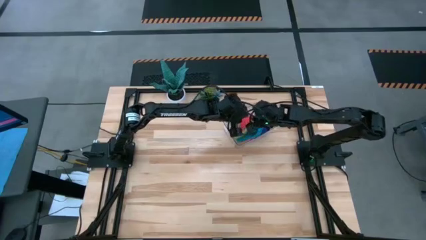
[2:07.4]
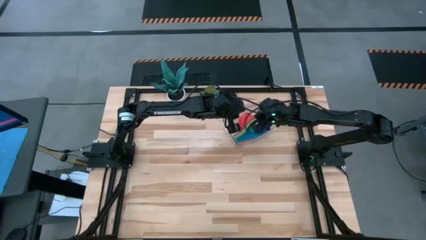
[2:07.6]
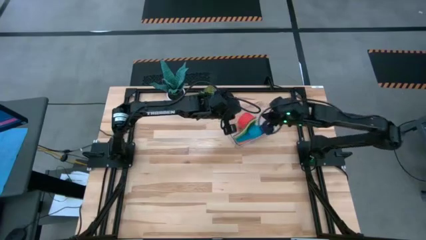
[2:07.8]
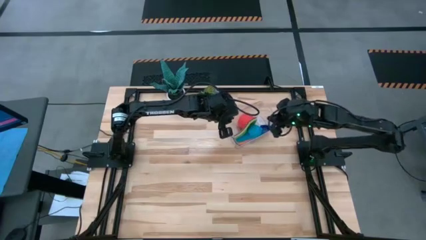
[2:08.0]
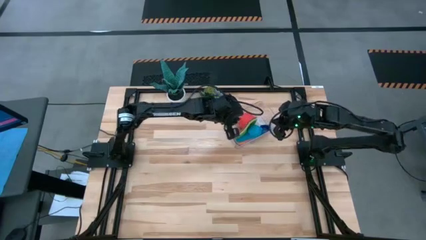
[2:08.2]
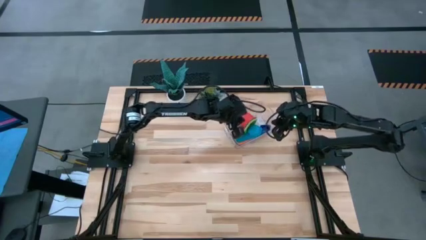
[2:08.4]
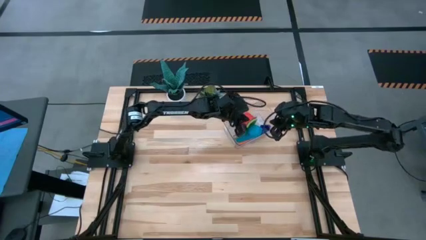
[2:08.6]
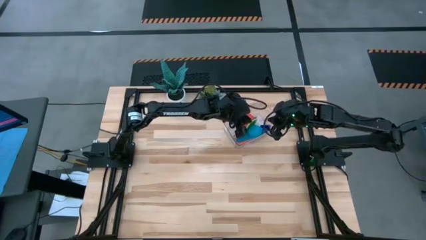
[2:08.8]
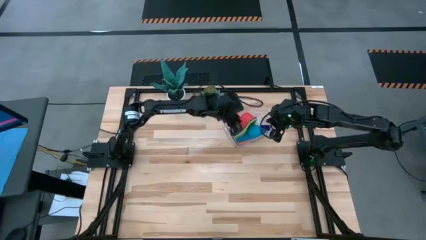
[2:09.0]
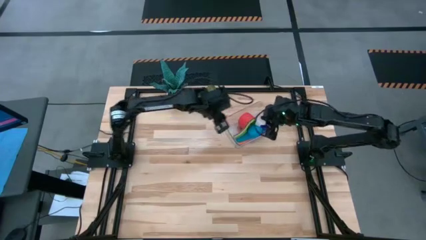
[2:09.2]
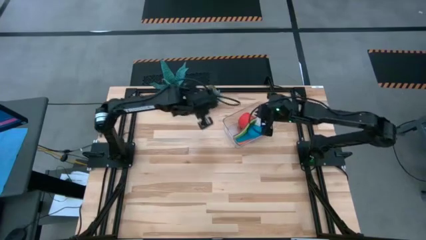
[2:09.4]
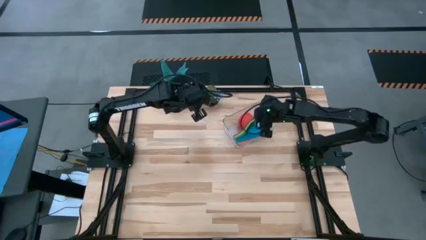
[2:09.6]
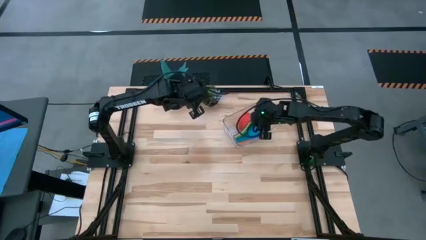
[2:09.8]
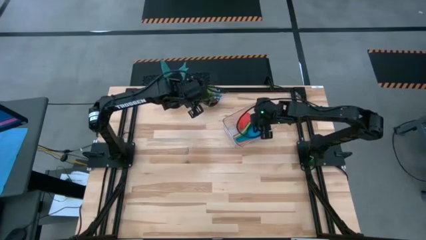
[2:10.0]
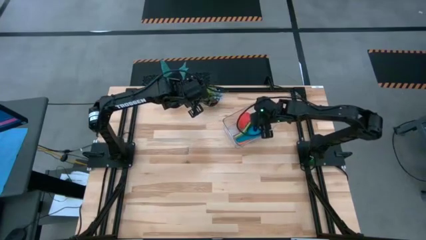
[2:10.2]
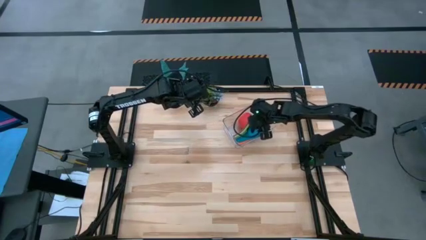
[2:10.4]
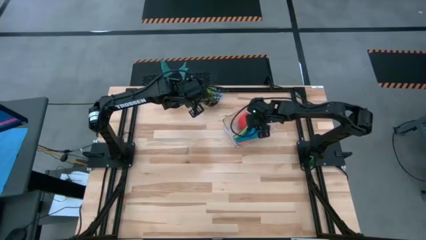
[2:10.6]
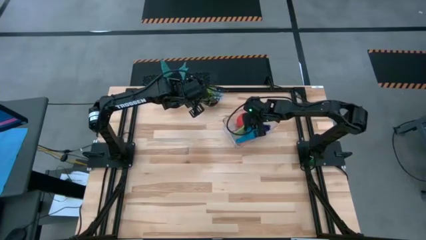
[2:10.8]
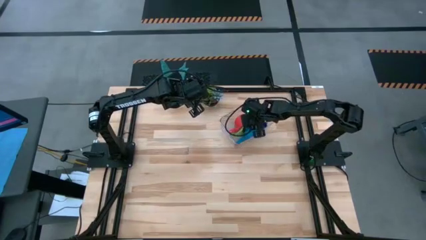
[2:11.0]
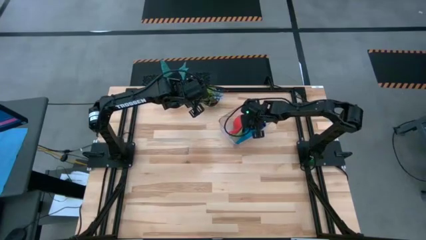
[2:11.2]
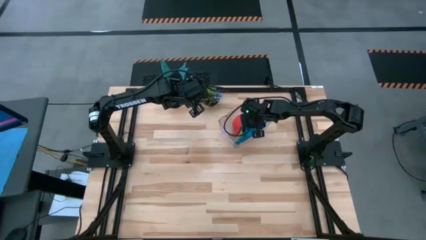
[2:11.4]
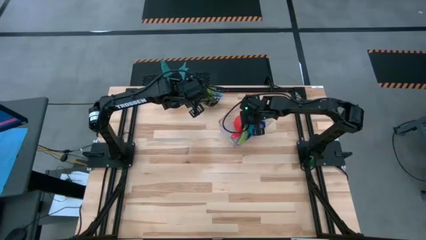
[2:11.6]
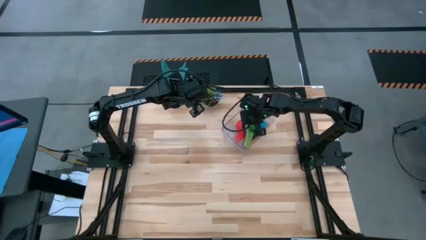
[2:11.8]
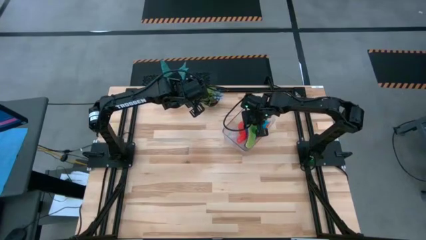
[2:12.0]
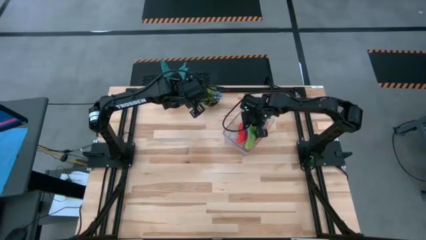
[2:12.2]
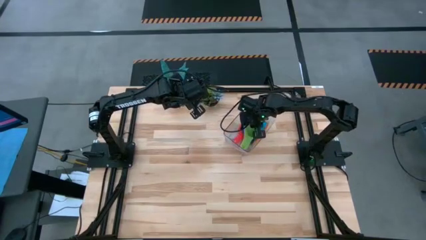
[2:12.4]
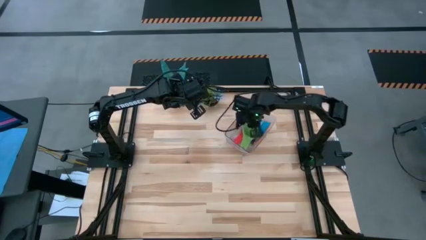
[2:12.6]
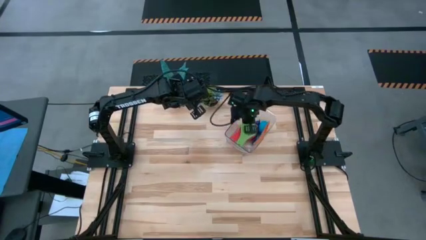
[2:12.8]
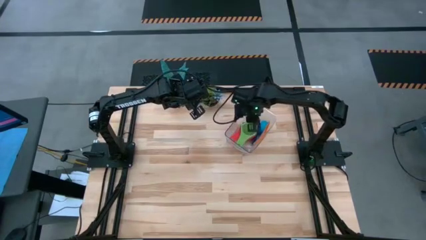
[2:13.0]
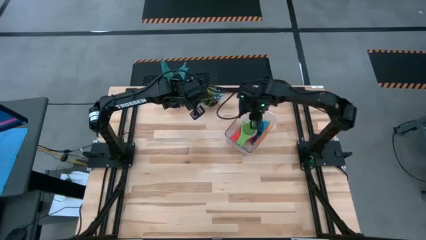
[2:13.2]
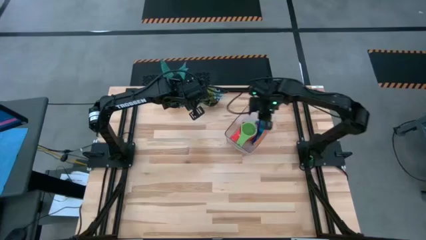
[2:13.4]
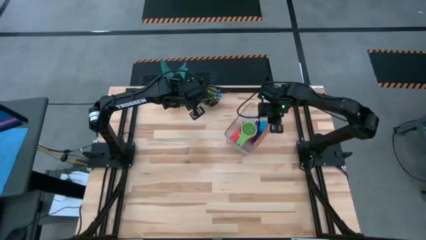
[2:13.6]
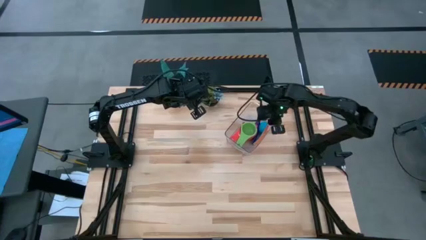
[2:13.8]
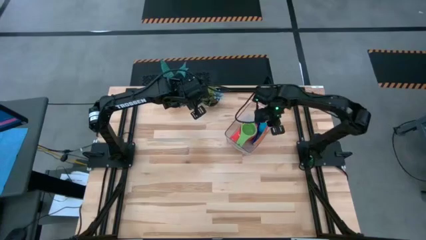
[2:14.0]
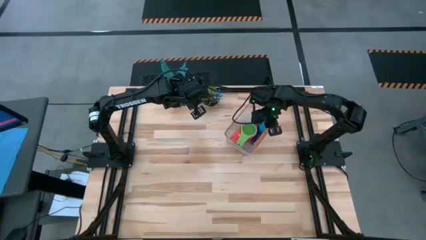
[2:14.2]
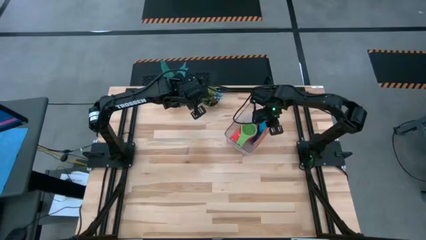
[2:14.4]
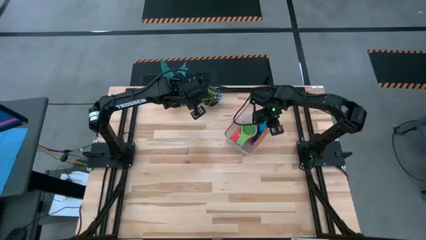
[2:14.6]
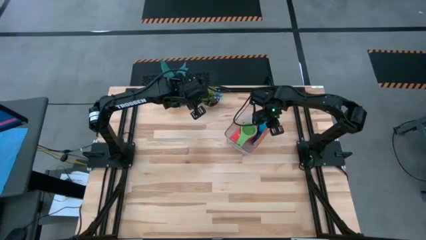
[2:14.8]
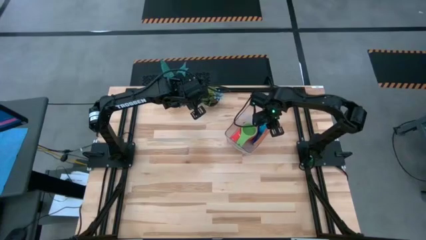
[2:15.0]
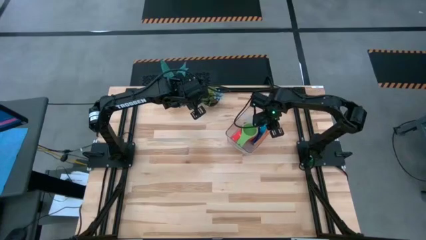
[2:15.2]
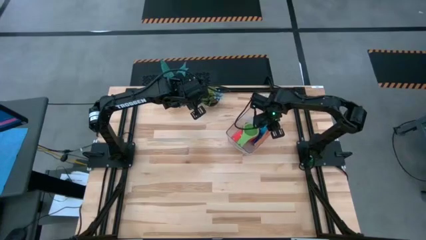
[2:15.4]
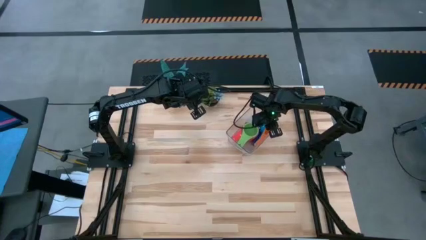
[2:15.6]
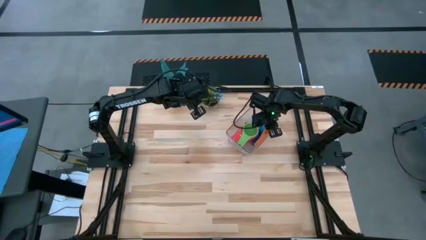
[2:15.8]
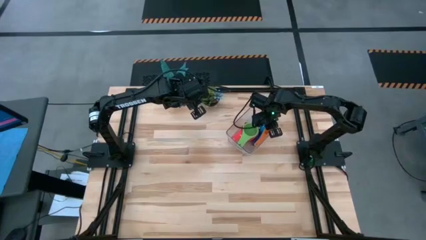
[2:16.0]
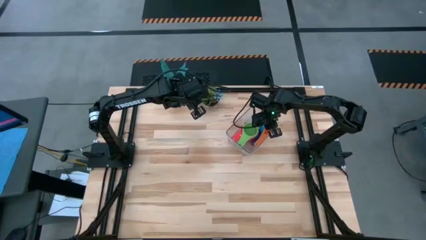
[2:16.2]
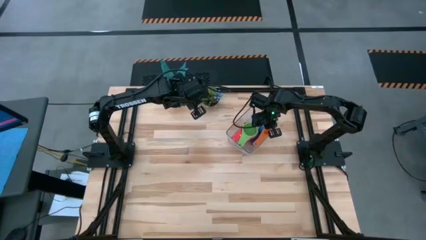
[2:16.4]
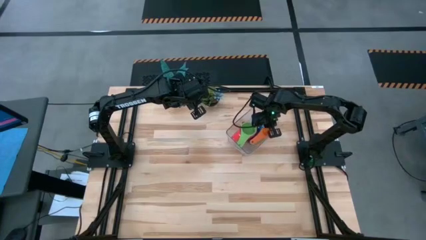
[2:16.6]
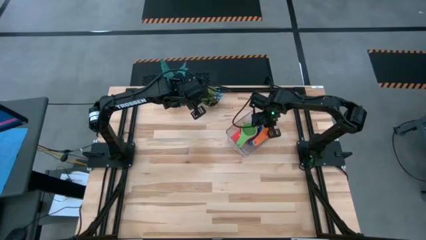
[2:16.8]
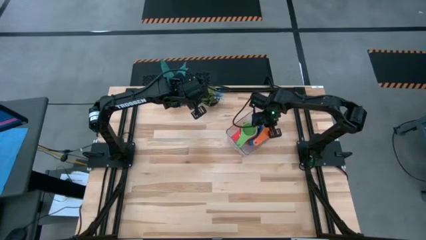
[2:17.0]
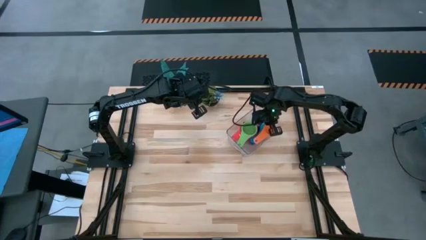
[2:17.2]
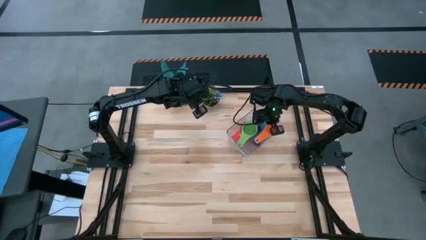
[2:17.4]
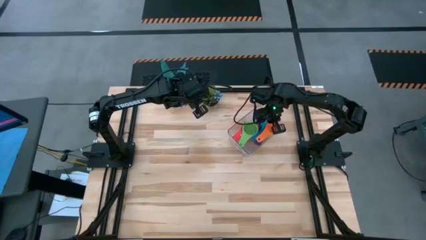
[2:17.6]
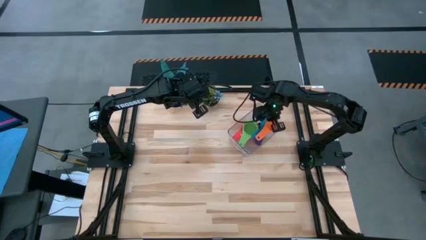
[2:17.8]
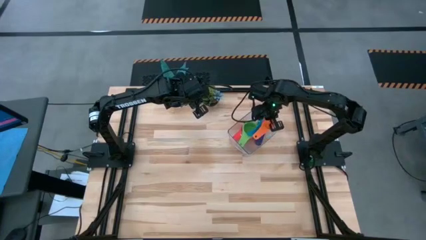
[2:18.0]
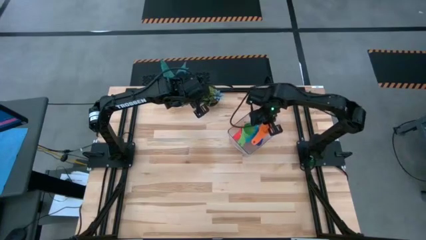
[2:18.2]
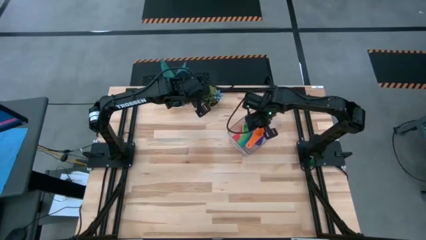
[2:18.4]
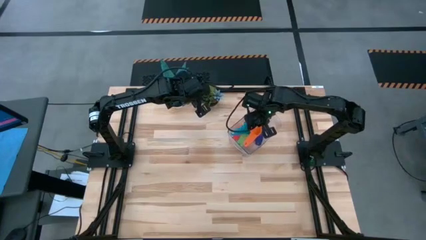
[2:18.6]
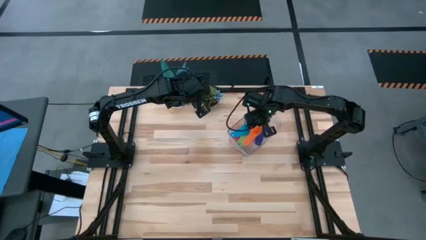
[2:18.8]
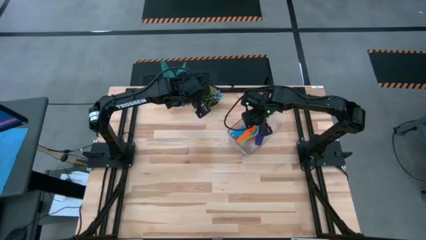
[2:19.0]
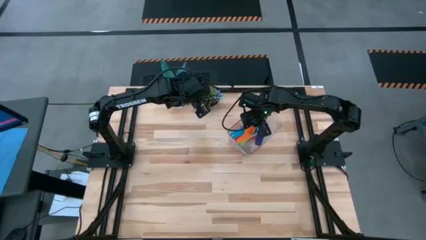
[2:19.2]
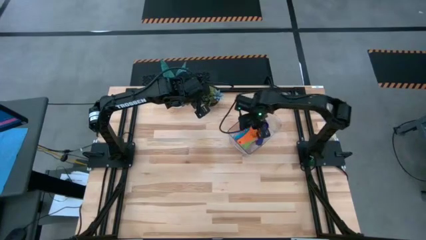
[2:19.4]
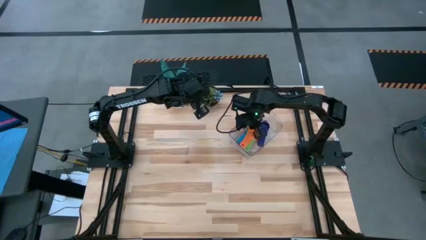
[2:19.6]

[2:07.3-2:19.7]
Task: Nest measuring cups in basket
Adjust the nested measuring cups in the transparent bin

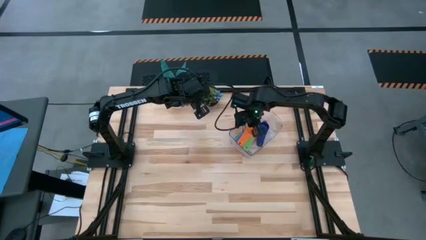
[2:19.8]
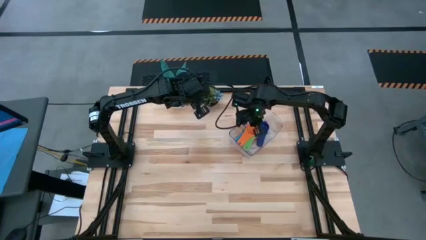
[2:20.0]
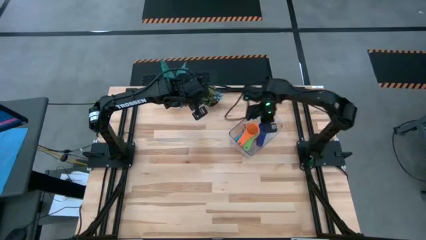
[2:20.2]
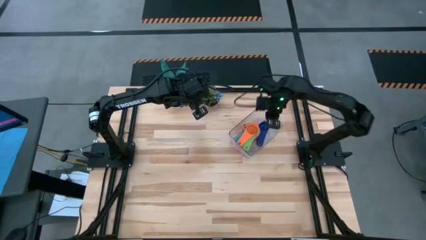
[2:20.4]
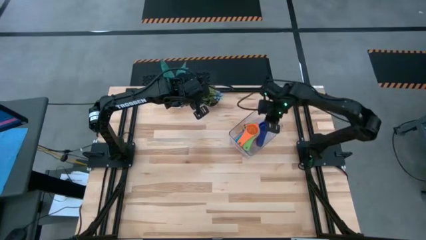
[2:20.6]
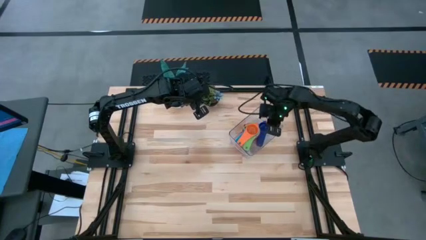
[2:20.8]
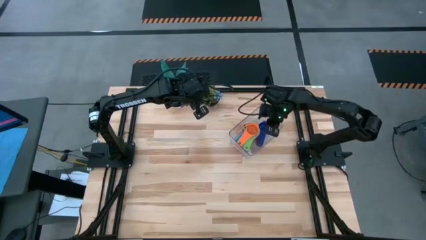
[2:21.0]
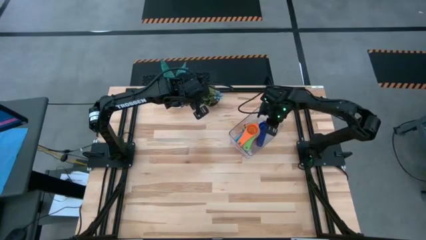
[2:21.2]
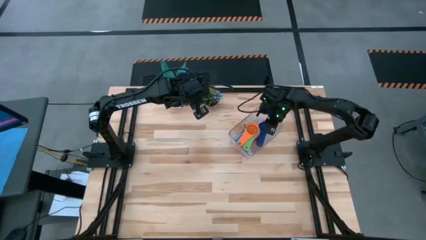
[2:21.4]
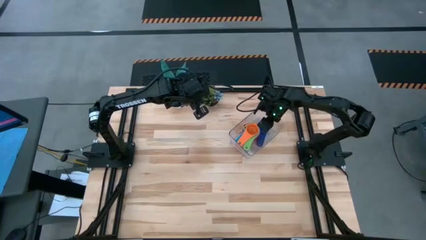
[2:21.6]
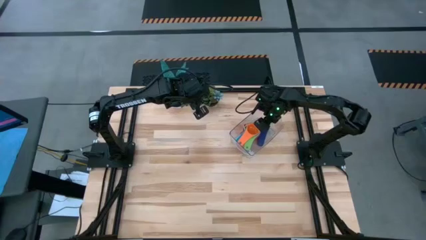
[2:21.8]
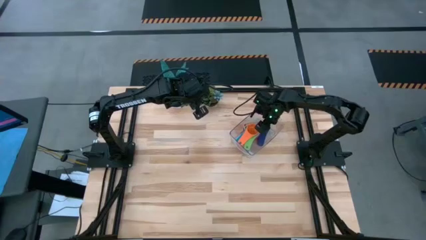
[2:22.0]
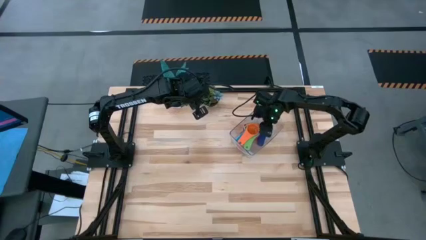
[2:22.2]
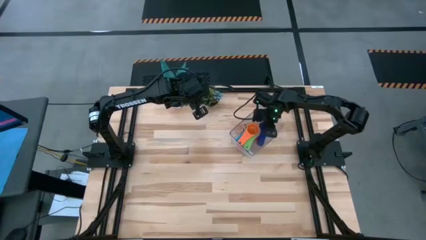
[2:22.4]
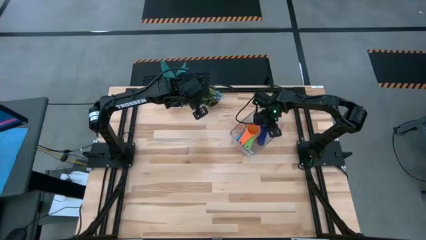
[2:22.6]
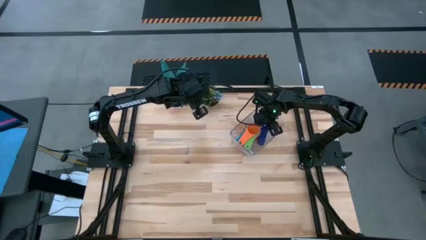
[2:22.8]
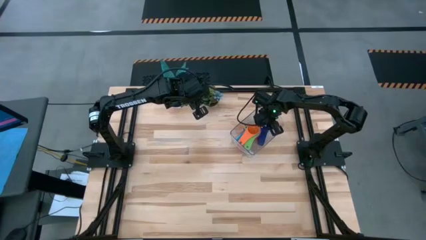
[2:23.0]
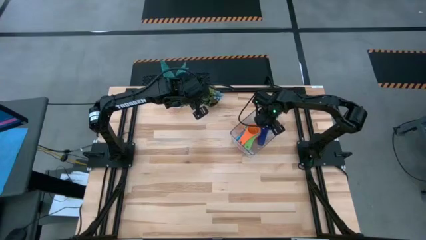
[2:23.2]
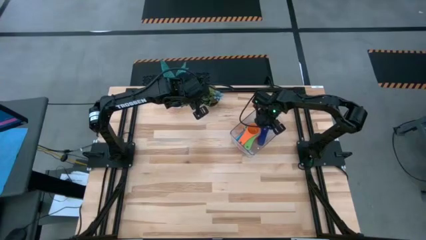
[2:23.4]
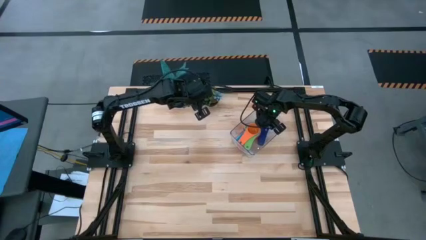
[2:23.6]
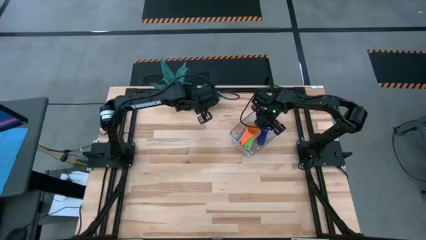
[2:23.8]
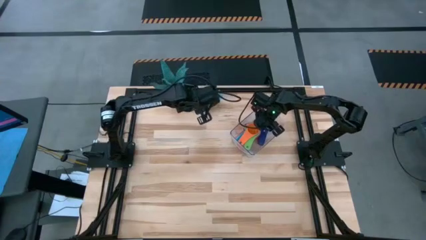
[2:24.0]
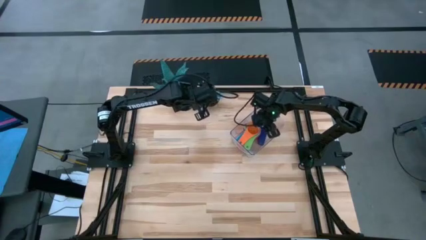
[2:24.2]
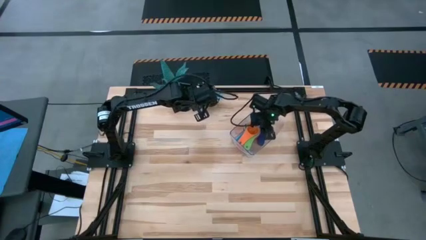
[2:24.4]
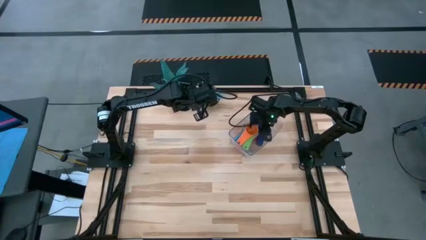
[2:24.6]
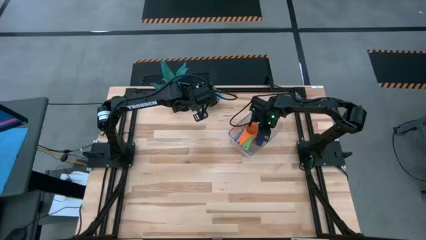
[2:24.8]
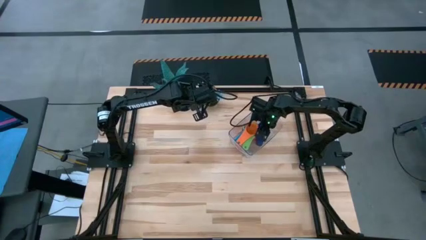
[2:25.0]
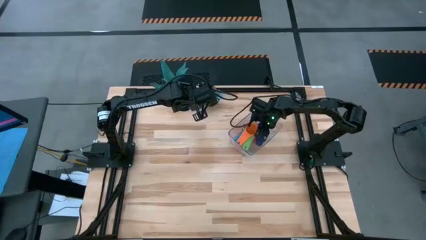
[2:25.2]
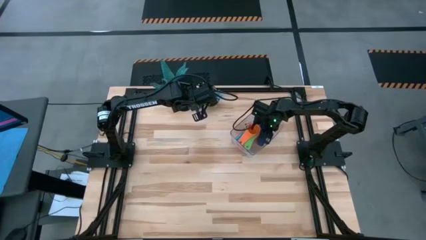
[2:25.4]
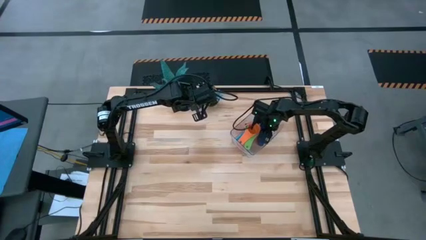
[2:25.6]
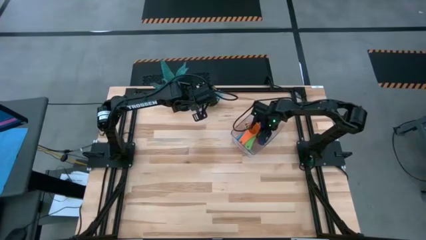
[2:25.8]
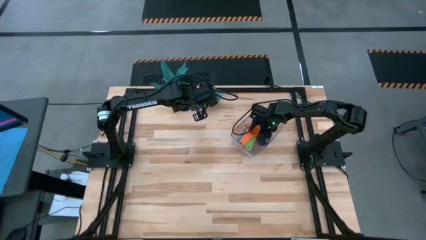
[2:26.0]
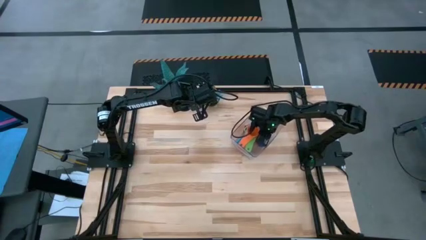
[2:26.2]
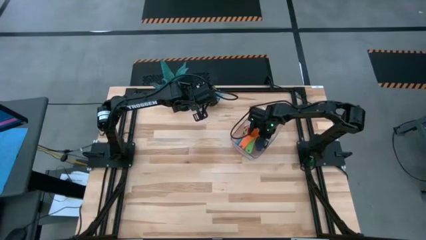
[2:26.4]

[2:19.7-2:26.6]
Adjust the nested measuring cups in the transparent bin
